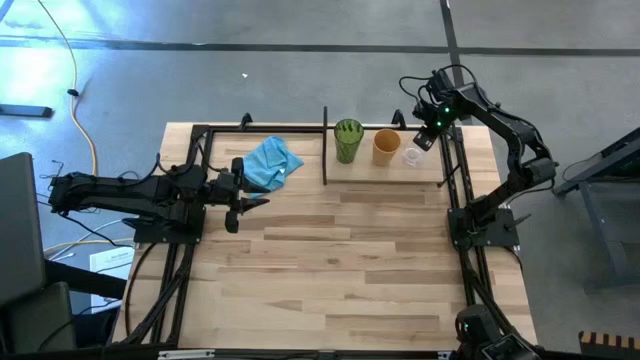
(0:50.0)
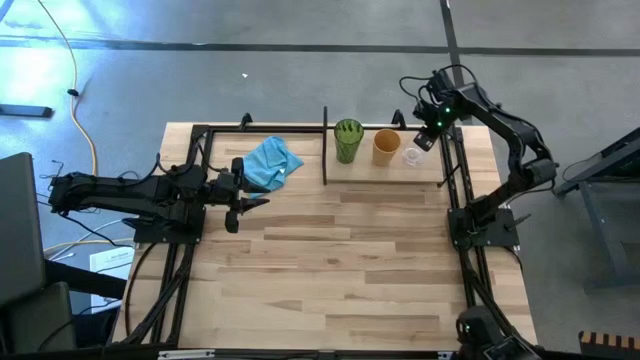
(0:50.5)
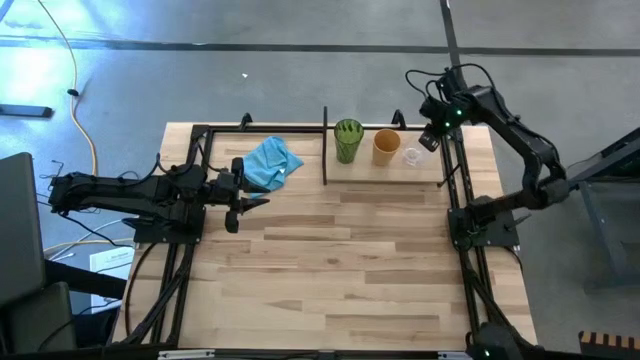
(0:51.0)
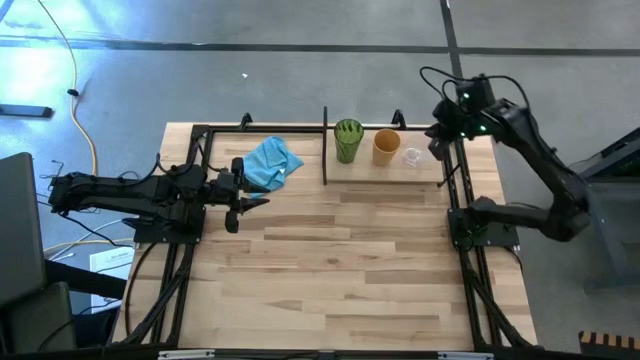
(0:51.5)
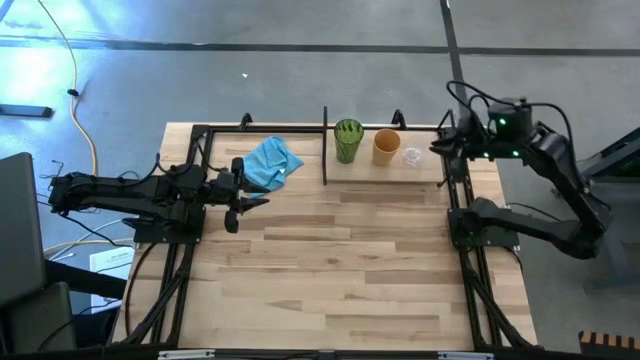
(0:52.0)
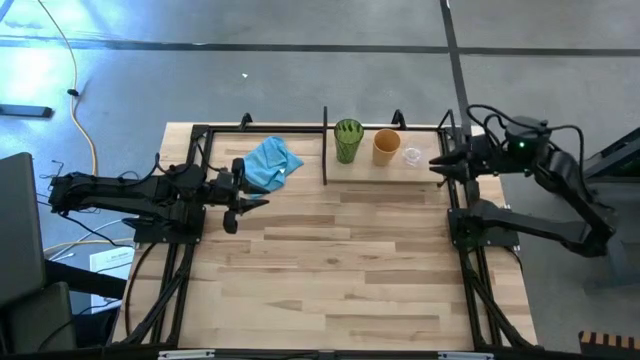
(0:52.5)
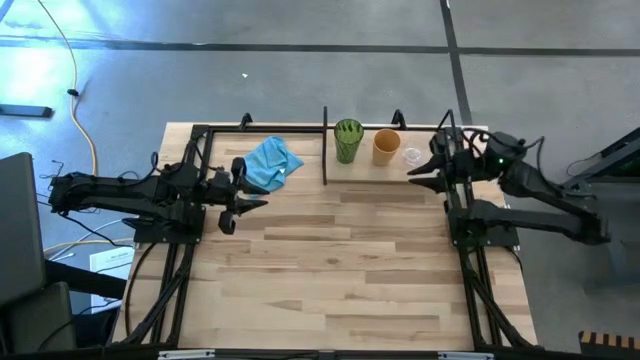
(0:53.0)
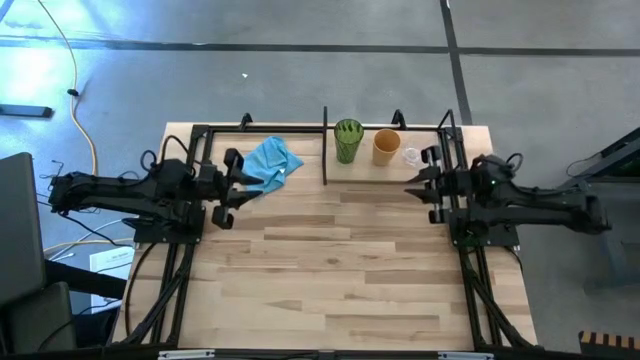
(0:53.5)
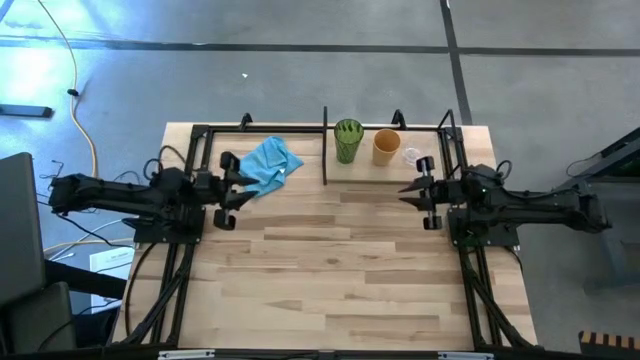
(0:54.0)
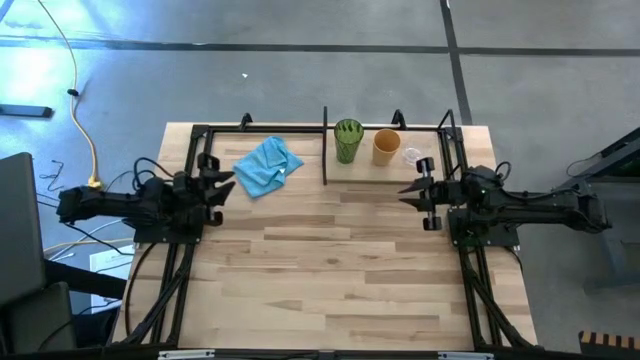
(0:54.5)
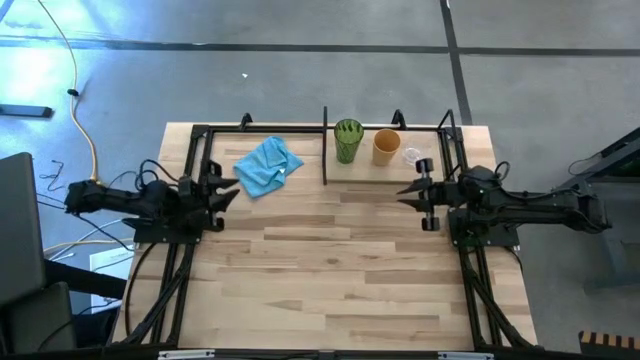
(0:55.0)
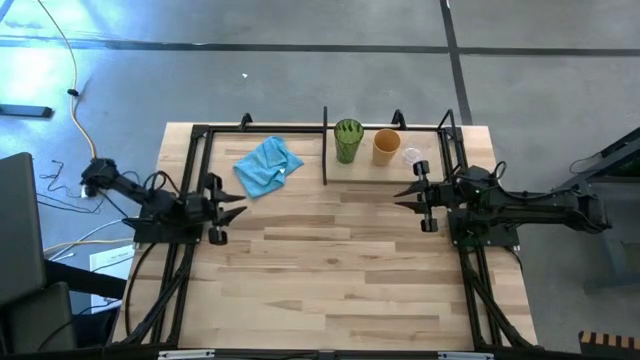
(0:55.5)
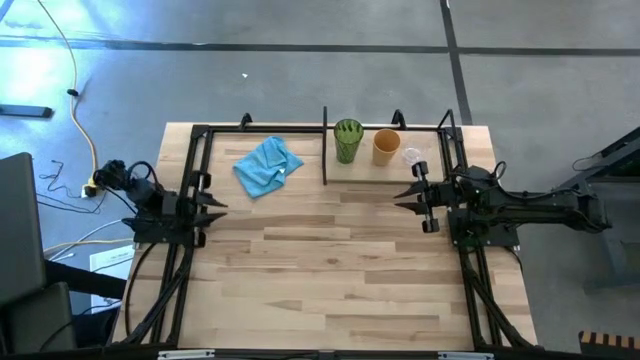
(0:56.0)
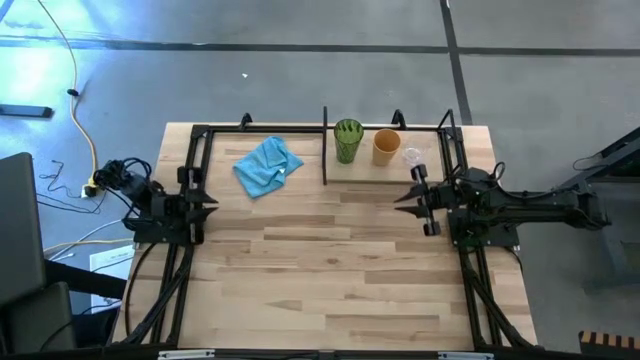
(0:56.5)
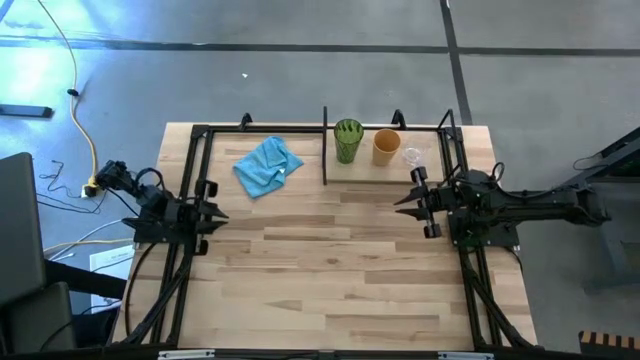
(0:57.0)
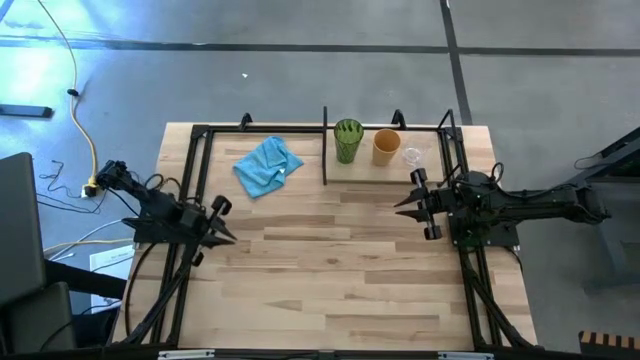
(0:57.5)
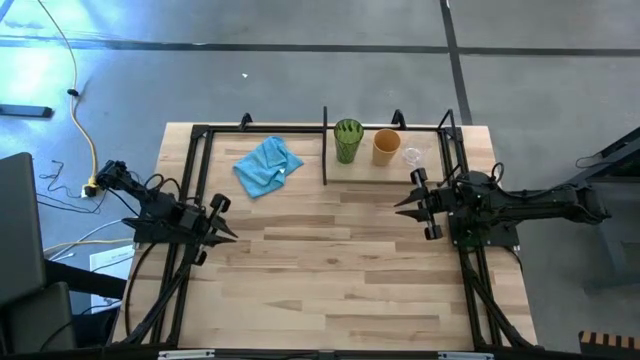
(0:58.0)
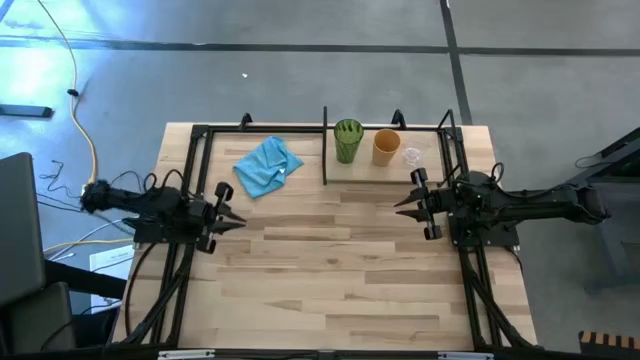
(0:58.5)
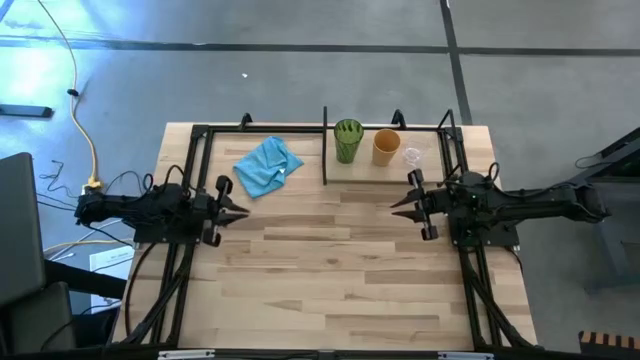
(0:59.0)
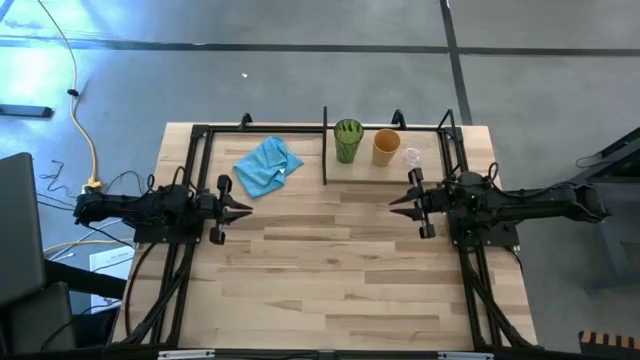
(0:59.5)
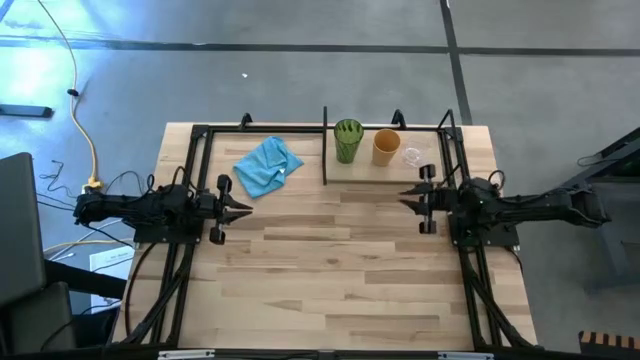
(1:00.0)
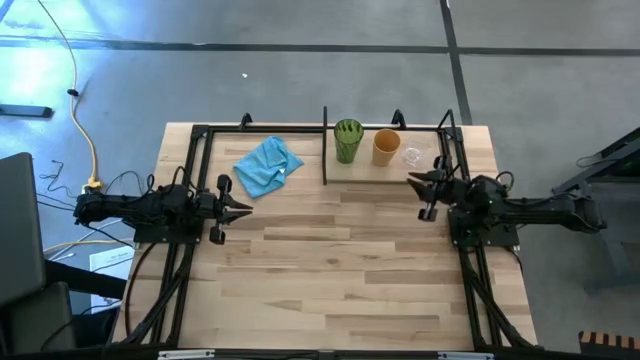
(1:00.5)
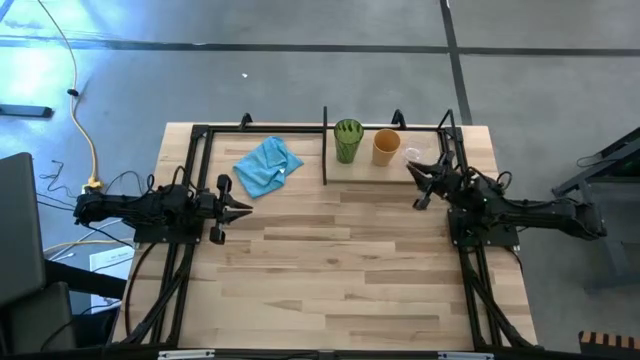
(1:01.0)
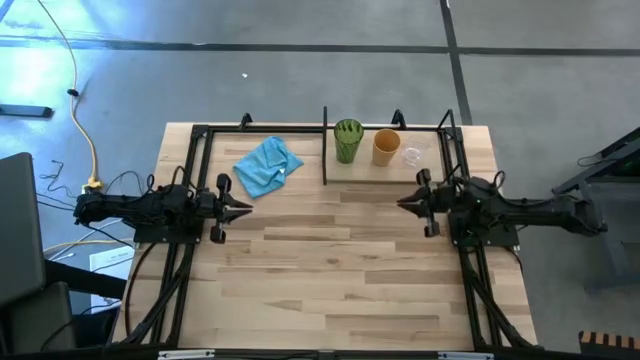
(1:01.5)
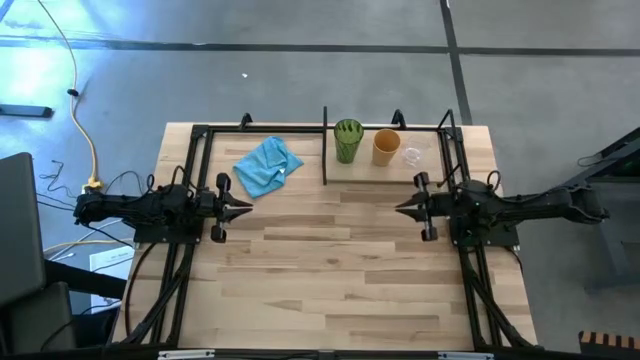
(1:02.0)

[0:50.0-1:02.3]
Task: Stack small to large cups/mugs on shelf
Return to Home Position

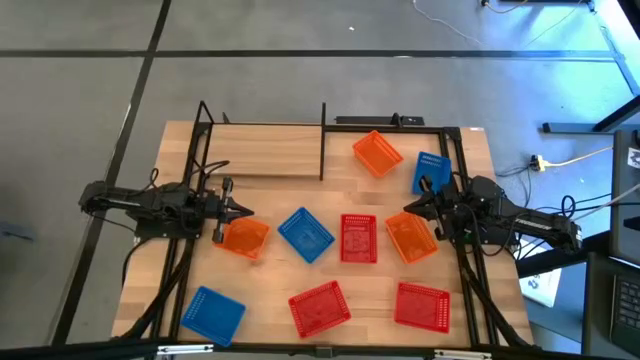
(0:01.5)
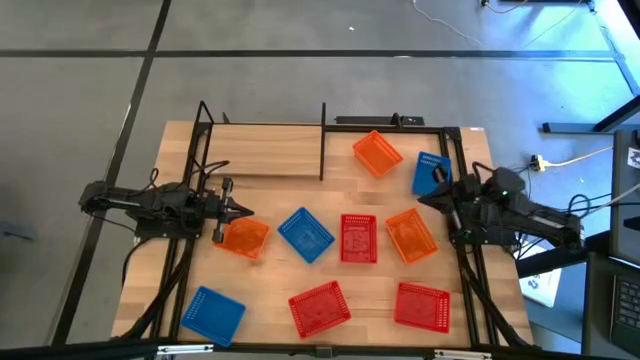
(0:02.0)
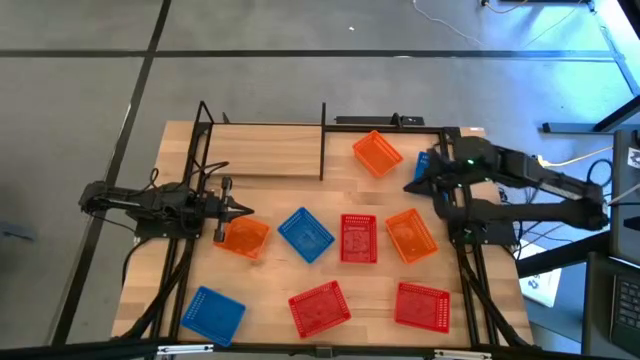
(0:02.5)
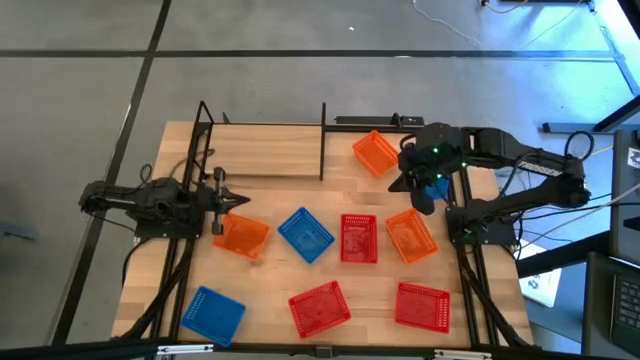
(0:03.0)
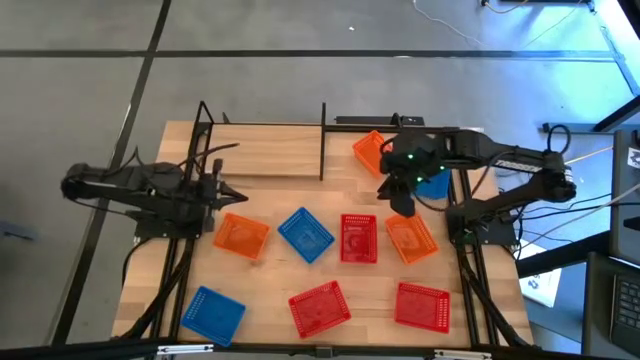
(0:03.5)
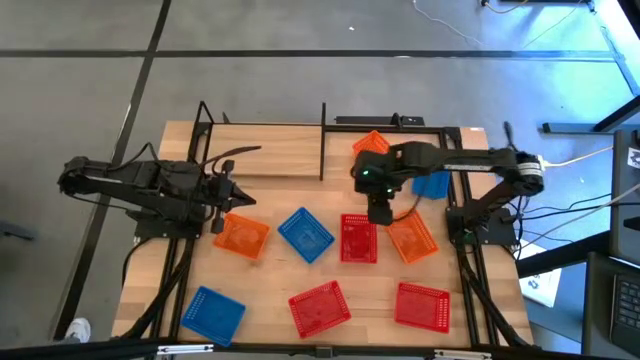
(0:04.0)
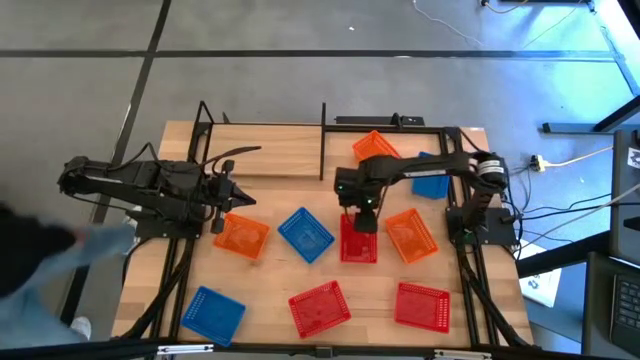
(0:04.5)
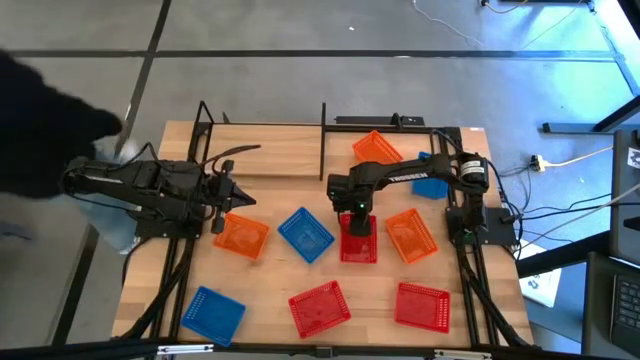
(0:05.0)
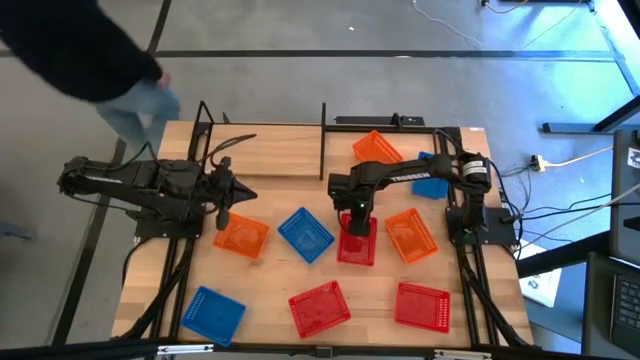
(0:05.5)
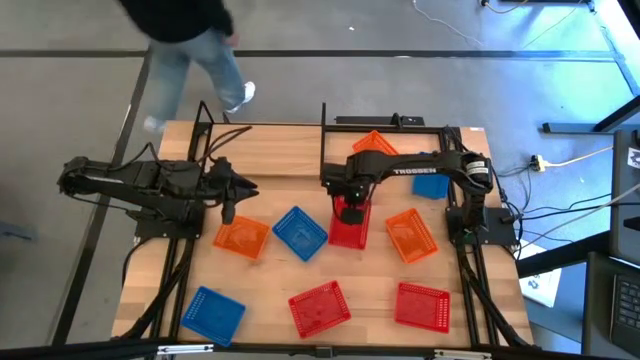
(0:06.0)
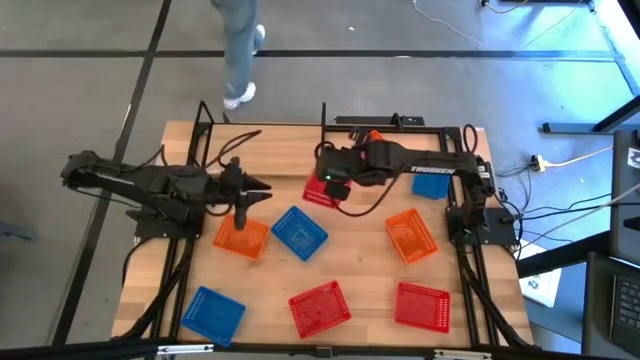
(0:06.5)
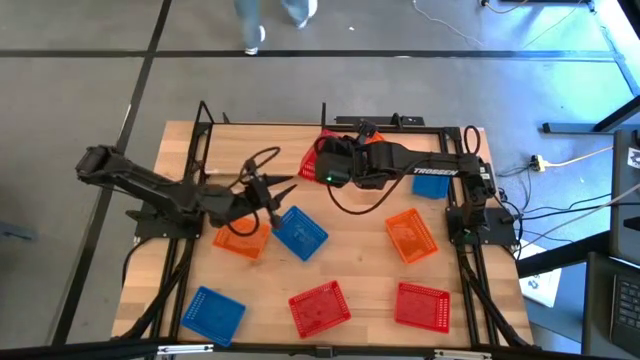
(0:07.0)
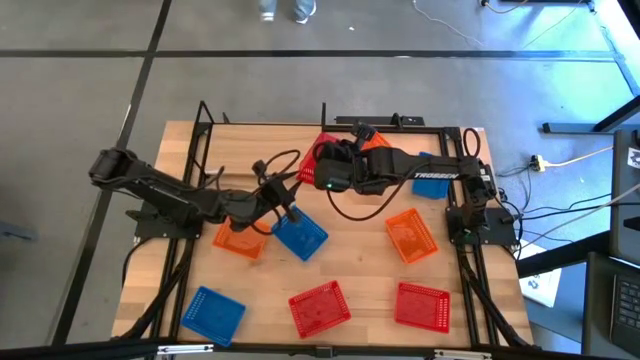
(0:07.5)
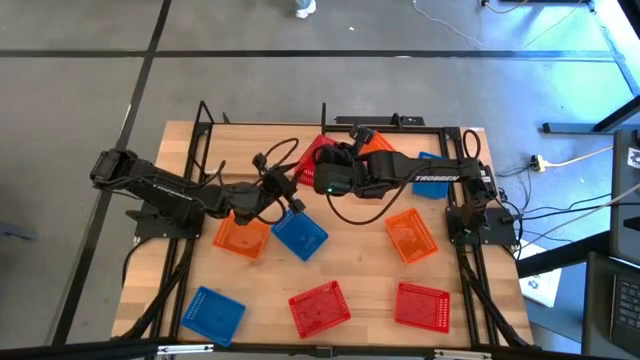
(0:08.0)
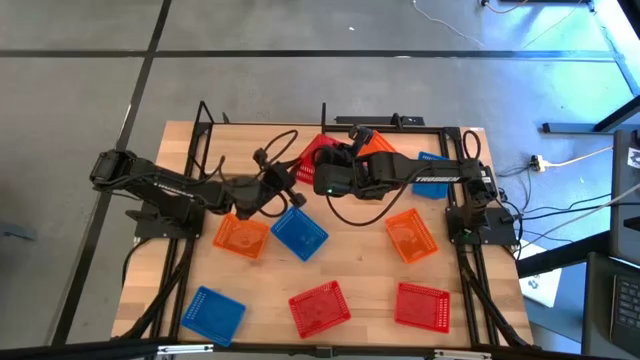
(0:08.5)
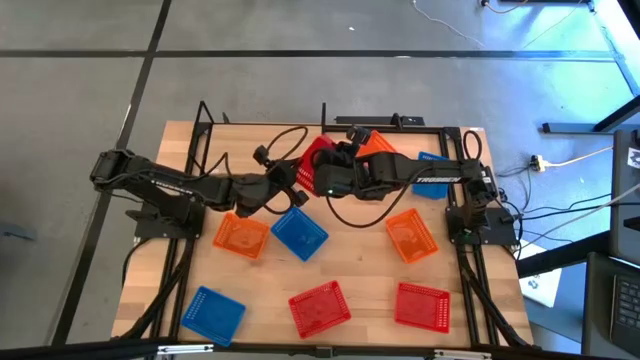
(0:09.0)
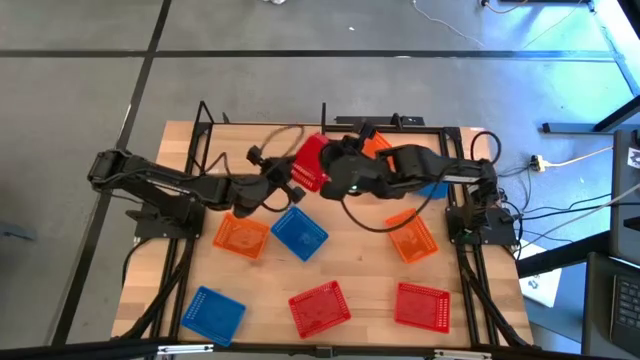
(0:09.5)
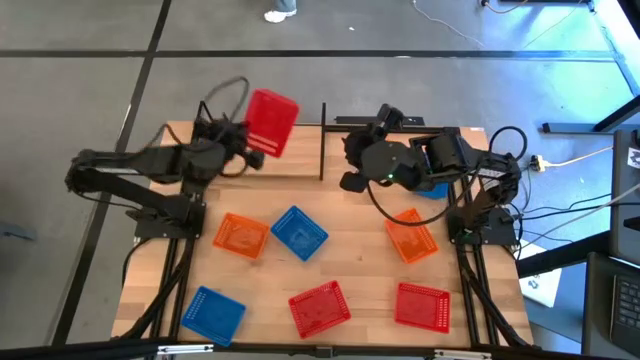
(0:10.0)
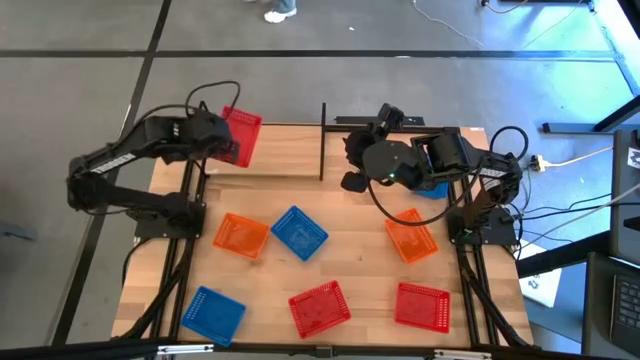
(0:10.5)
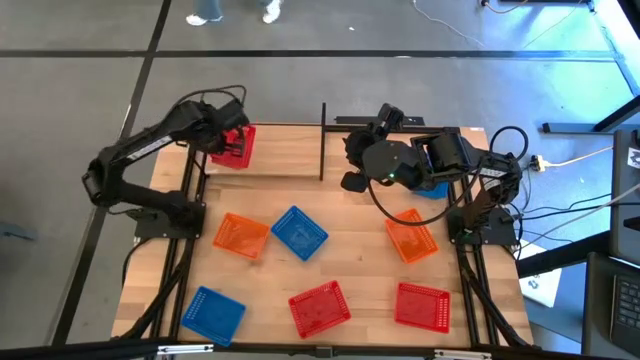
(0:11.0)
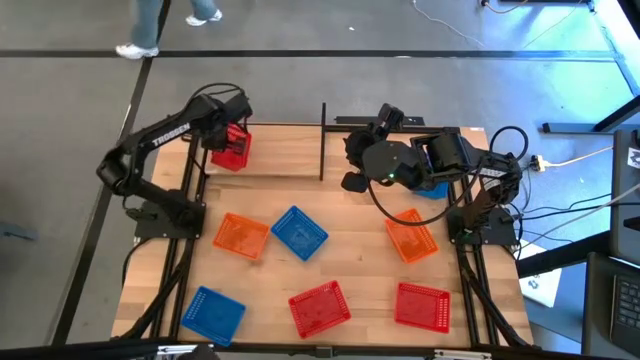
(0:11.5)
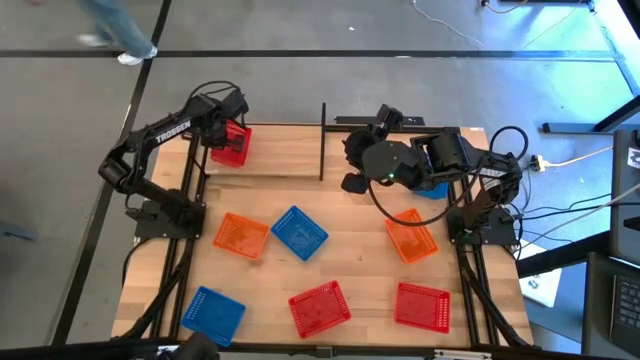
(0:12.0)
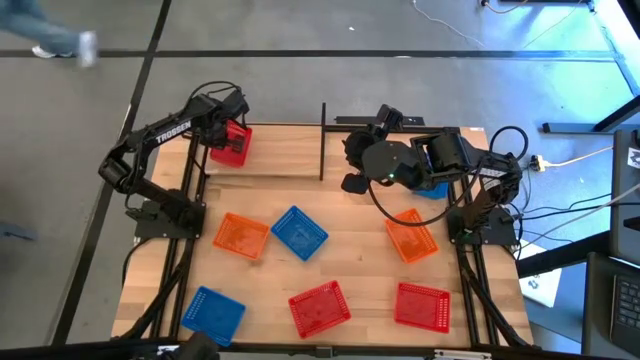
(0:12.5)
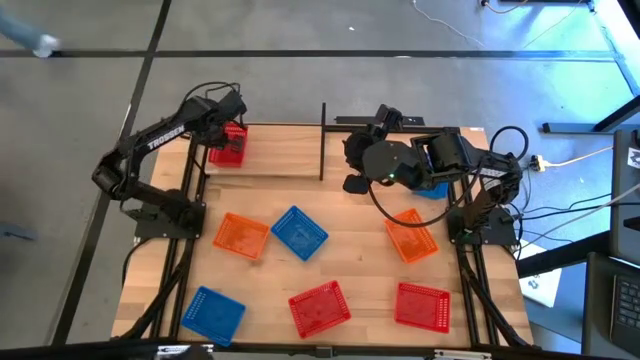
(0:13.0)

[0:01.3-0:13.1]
Task: Stack baskets on shelf by color
Put the top red bin on the shelf
